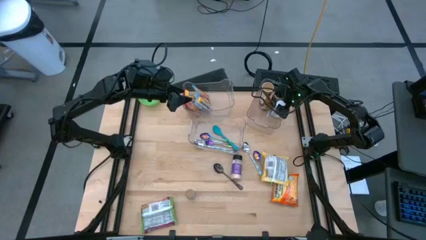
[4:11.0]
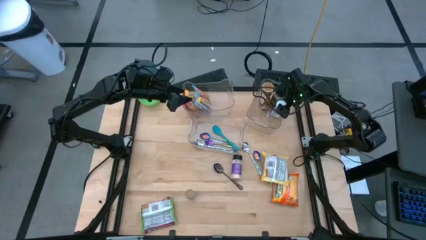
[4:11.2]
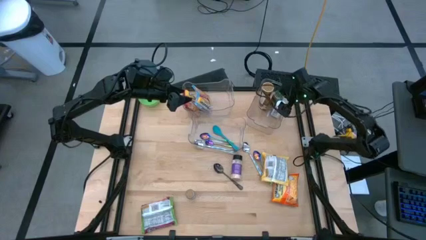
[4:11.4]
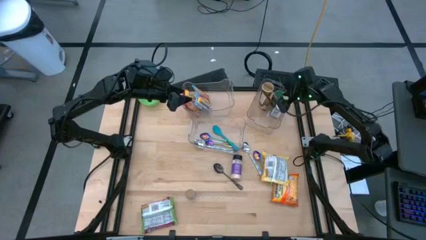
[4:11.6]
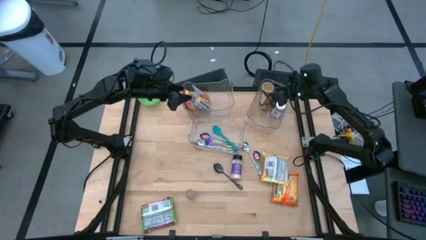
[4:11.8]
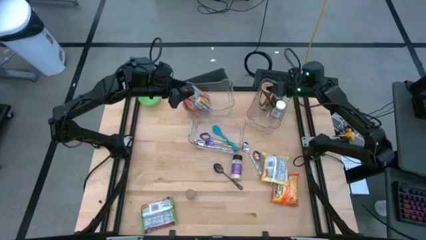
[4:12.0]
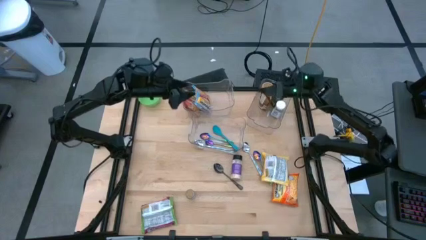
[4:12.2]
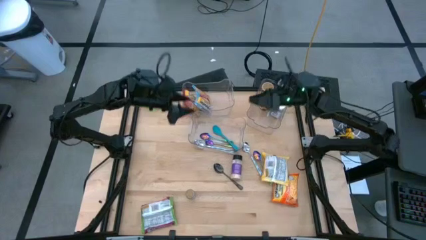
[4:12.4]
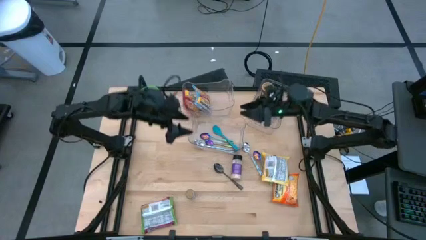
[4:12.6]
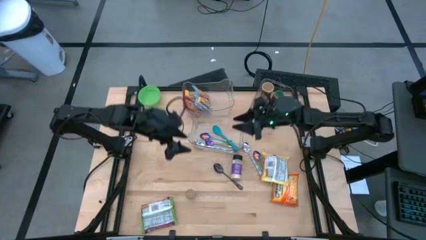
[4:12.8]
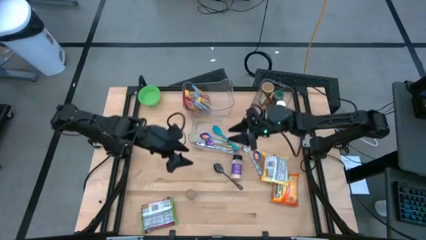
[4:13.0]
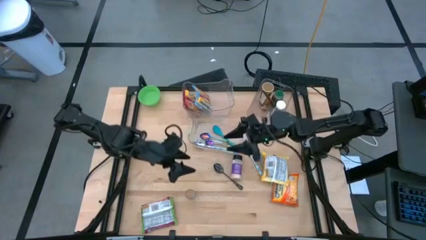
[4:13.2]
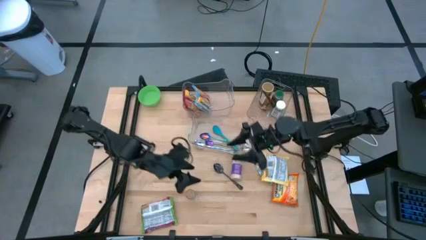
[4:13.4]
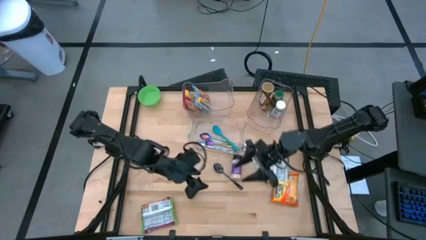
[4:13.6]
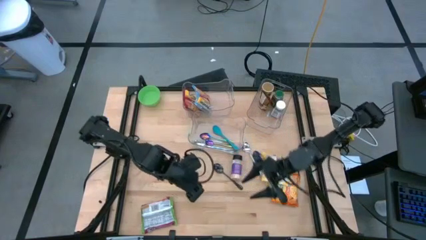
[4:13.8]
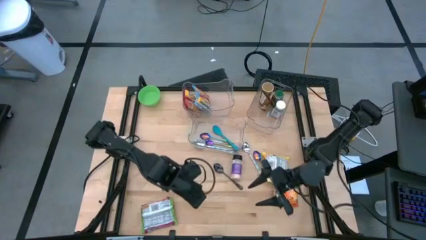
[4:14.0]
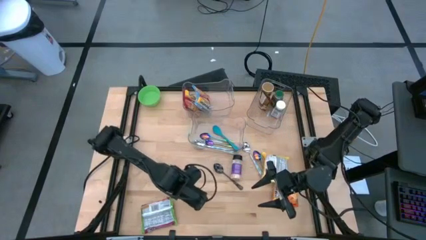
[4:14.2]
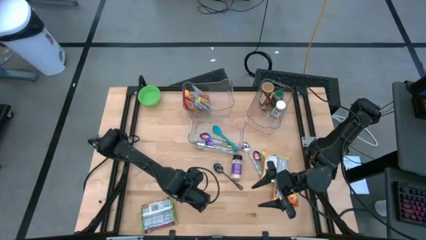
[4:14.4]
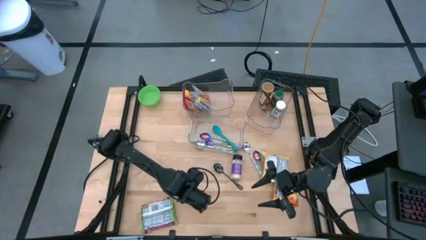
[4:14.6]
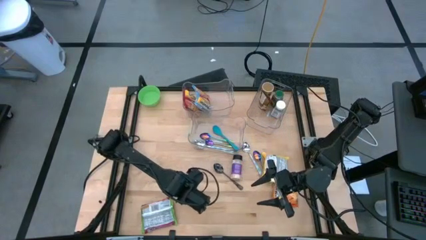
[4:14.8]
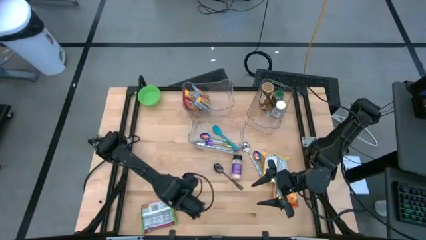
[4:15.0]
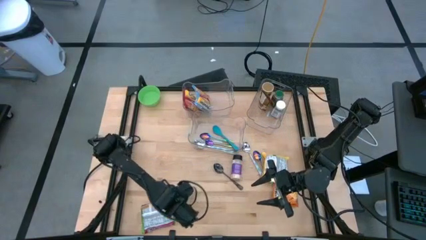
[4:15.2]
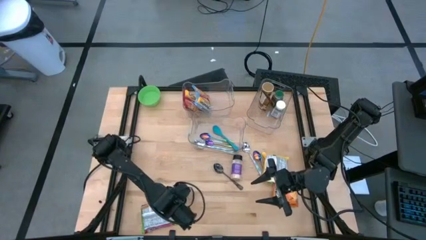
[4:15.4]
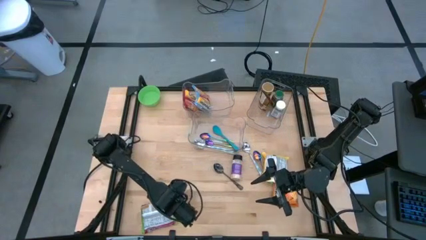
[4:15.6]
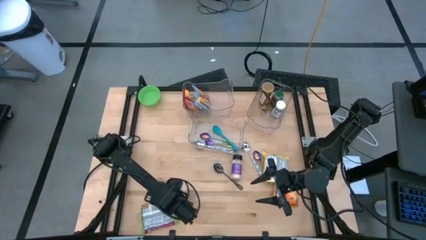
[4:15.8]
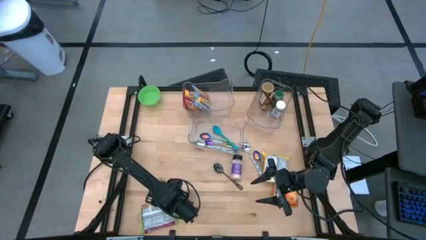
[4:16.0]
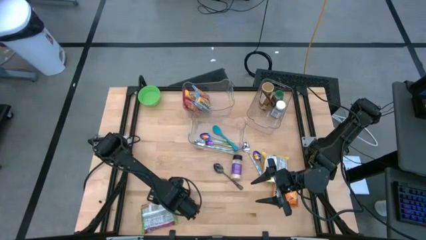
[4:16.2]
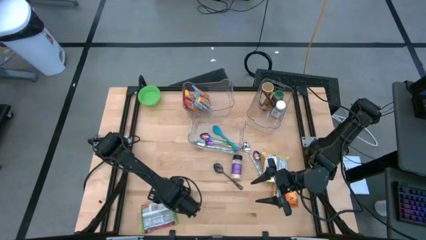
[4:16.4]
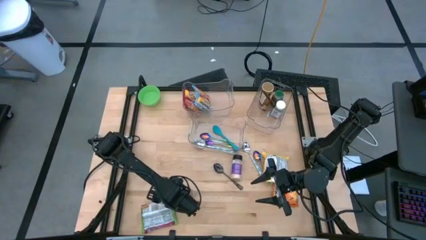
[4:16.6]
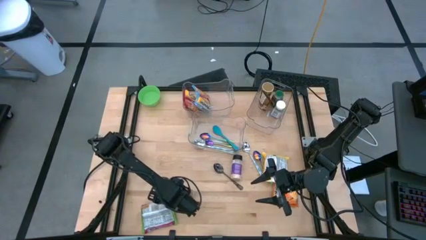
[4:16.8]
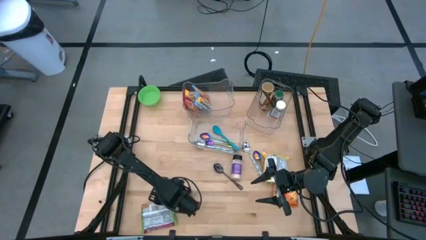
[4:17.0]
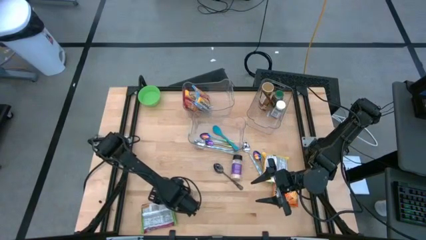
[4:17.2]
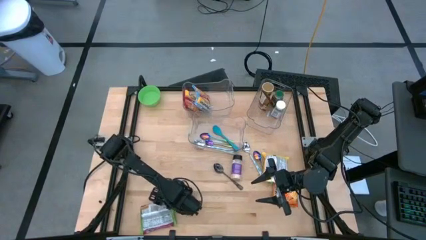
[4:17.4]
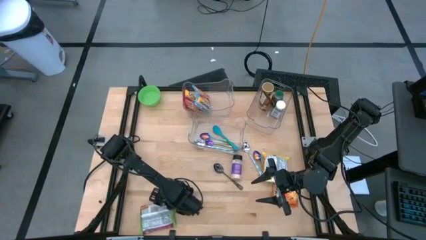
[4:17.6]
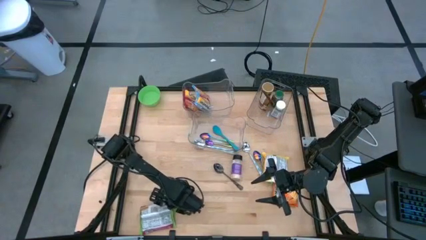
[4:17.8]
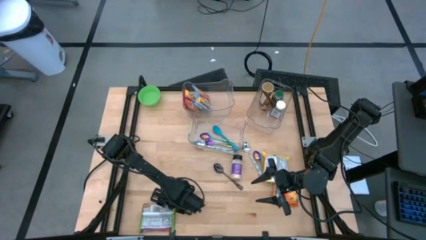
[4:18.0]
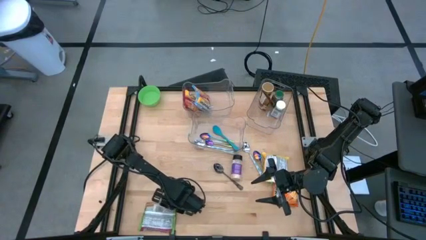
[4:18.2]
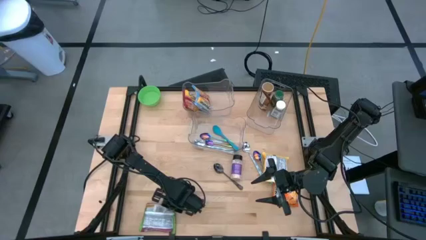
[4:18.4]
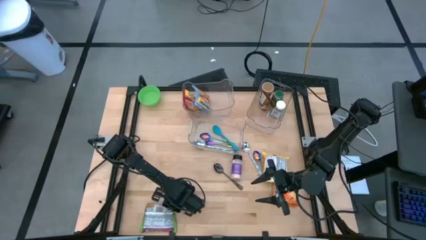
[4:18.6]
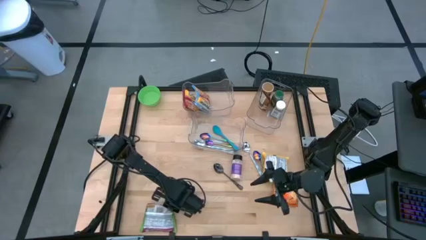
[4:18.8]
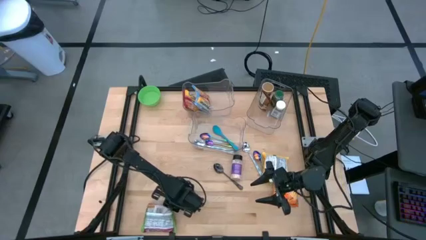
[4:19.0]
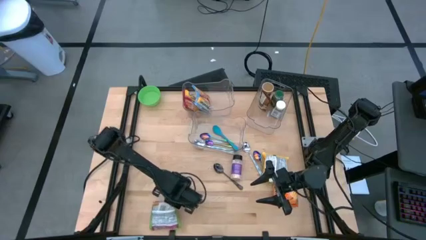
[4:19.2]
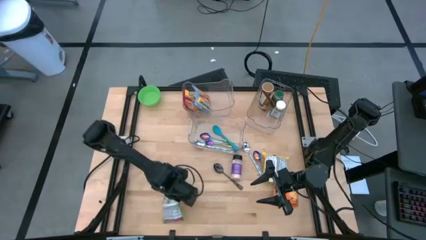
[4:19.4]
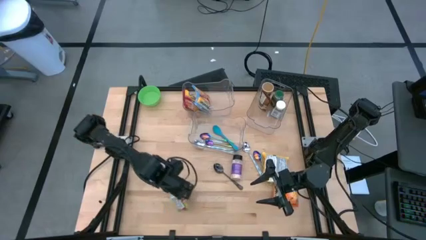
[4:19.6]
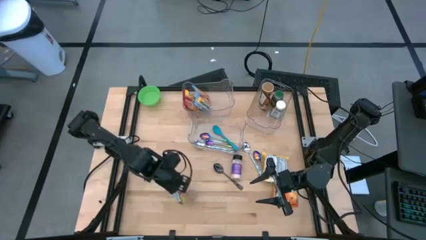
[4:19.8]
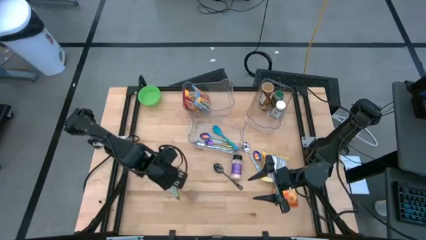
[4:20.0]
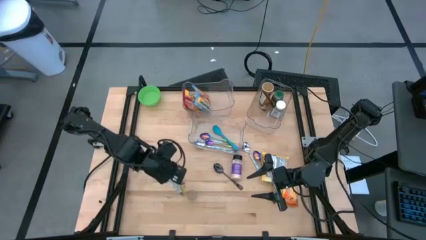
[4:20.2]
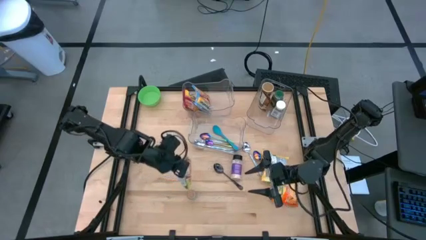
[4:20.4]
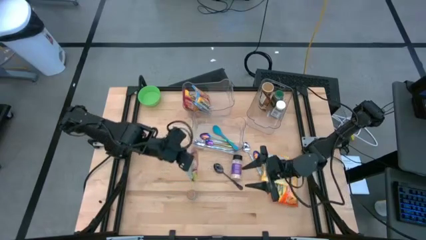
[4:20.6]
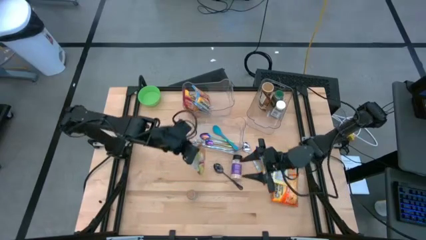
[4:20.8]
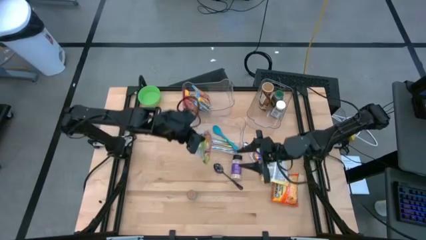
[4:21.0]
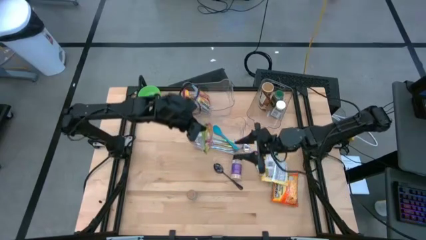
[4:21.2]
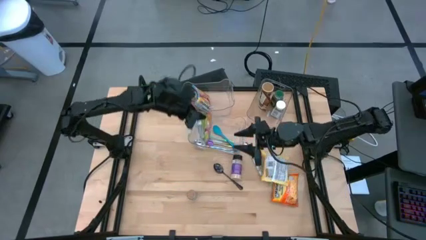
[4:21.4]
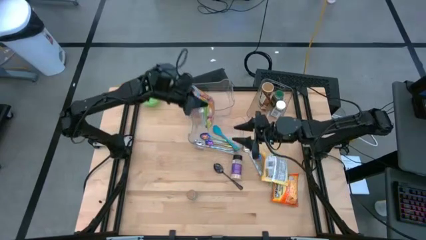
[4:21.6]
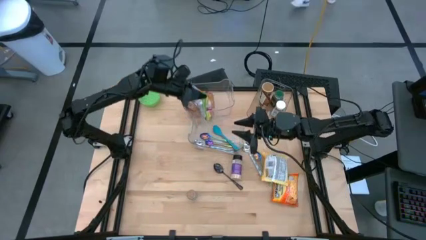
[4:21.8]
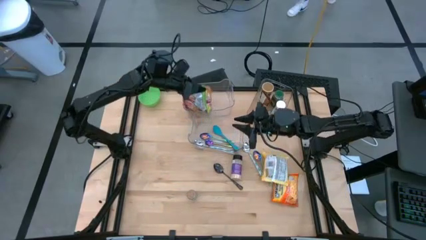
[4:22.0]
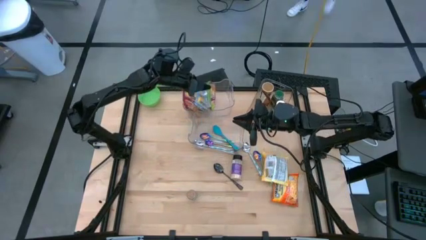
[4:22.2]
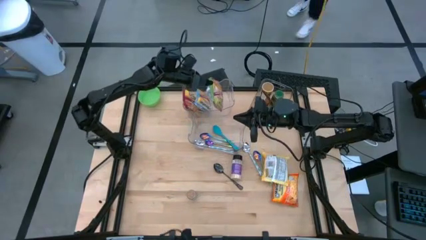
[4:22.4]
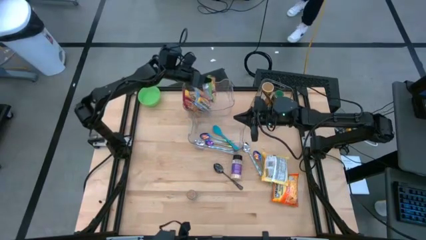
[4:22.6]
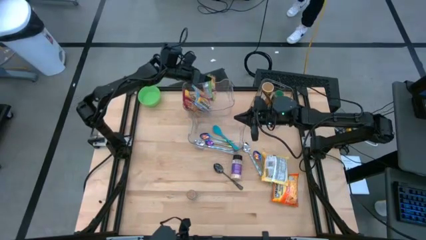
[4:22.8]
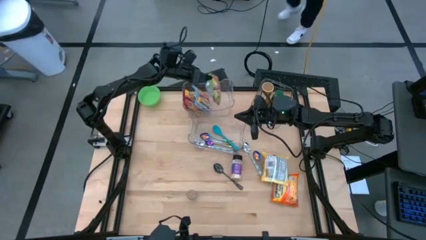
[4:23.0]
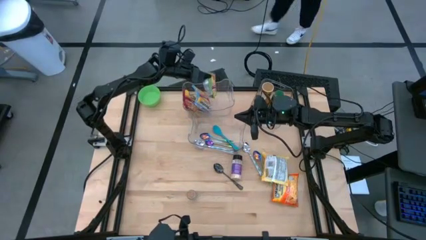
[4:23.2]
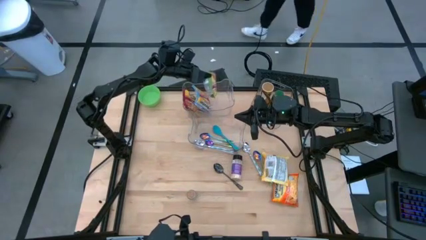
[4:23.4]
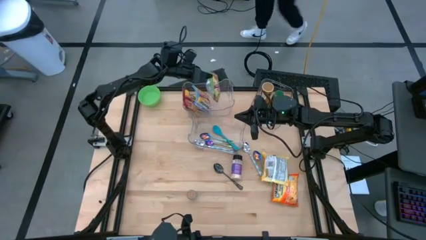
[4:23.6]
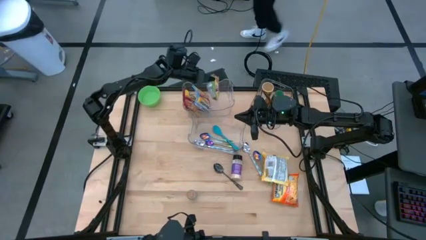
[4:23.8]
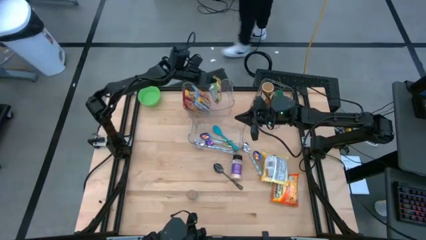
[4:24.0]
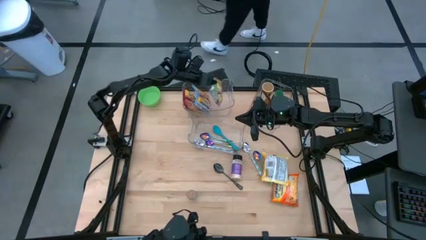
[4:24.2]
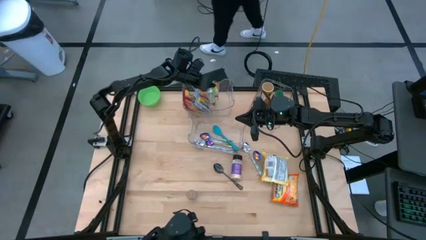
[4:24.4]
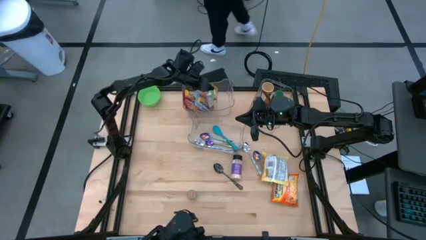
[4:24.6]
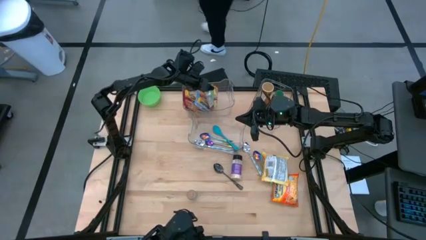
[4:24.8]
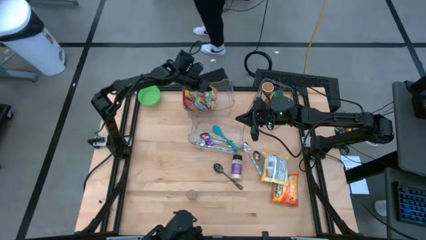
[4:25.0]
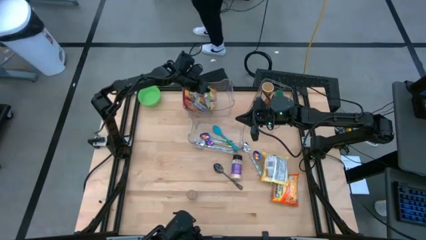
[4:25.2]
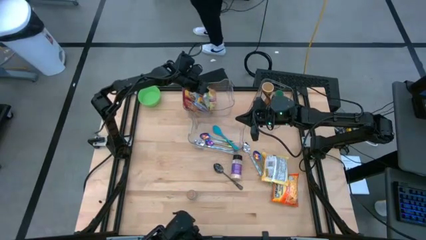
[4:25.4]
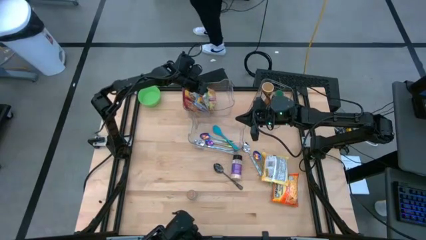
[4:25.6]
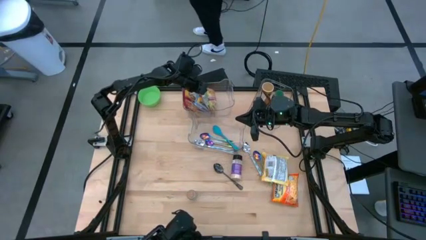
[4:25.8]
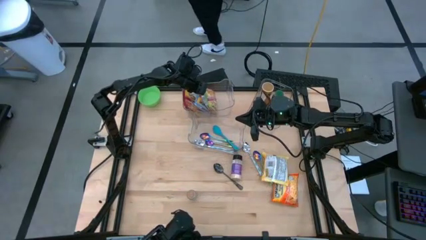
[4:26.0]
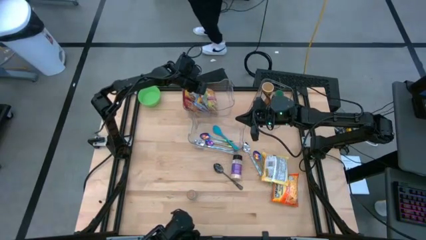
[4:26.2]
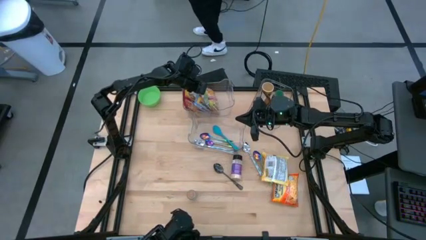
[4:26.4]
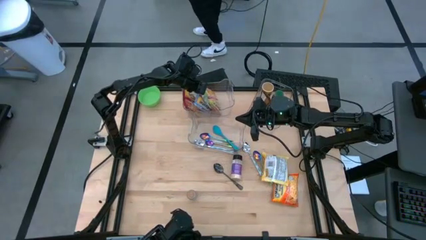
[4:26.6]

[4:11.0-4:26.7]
Task: Pick & Place Food Item
Put the green noodle pack into the top left transparent bin
